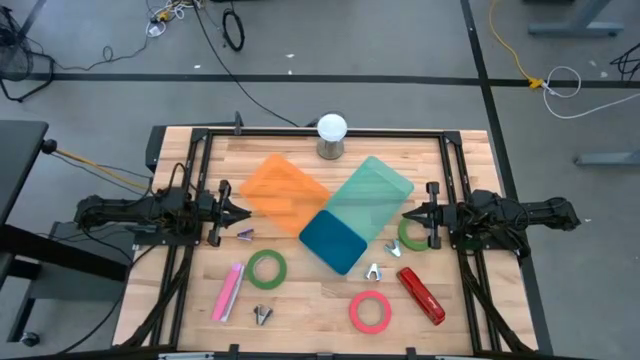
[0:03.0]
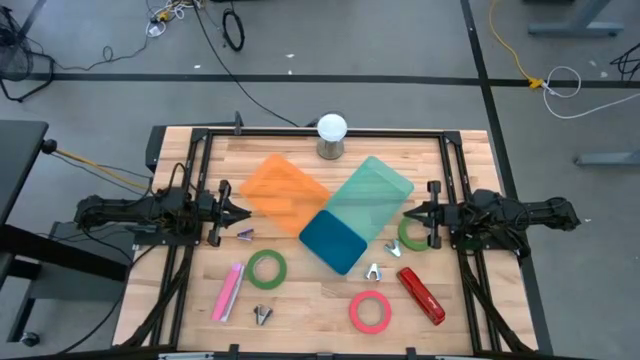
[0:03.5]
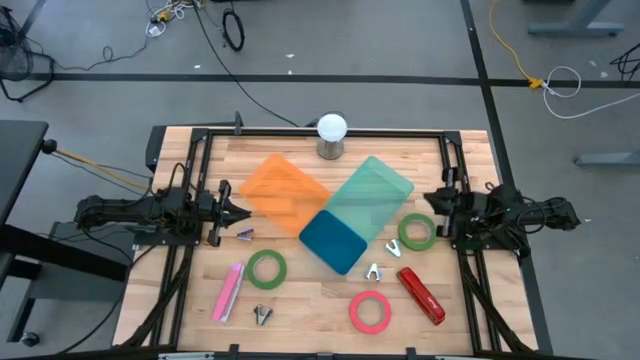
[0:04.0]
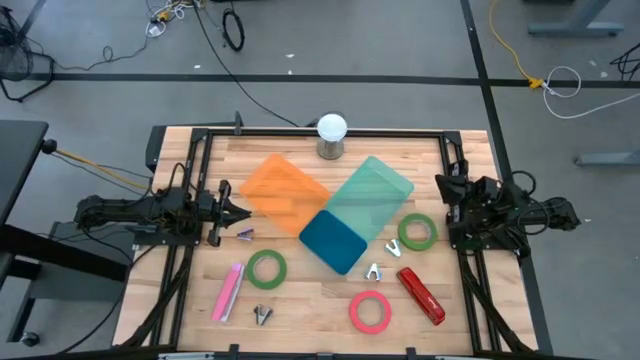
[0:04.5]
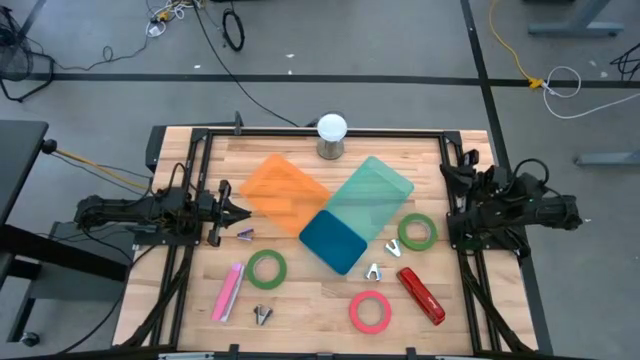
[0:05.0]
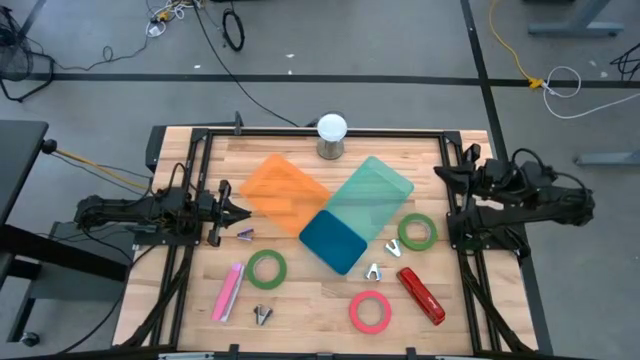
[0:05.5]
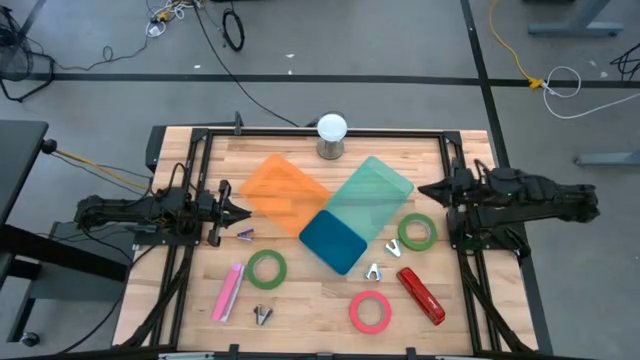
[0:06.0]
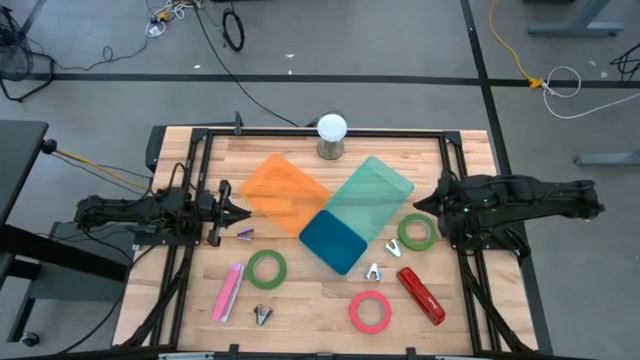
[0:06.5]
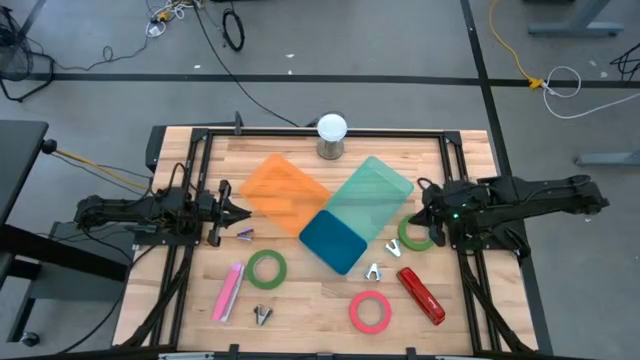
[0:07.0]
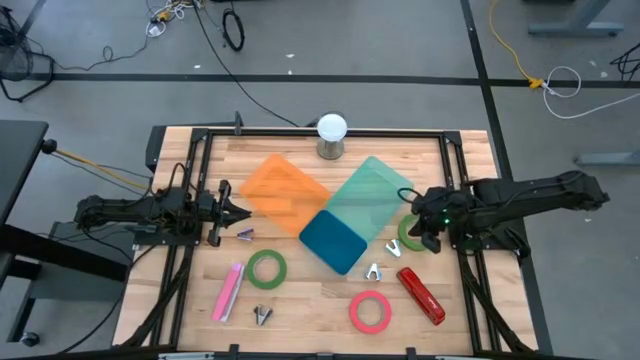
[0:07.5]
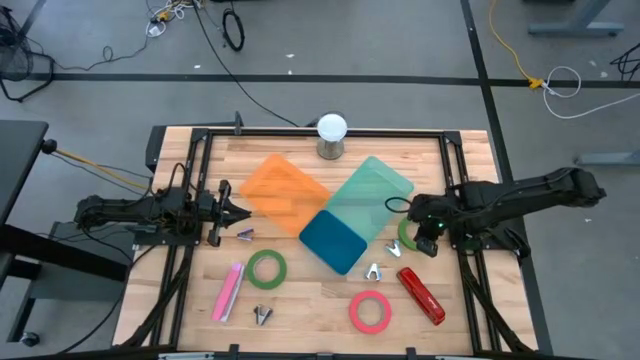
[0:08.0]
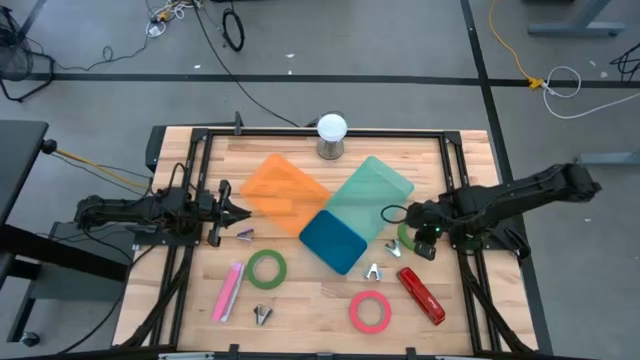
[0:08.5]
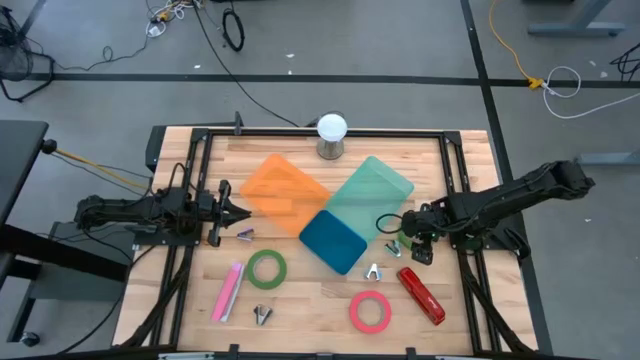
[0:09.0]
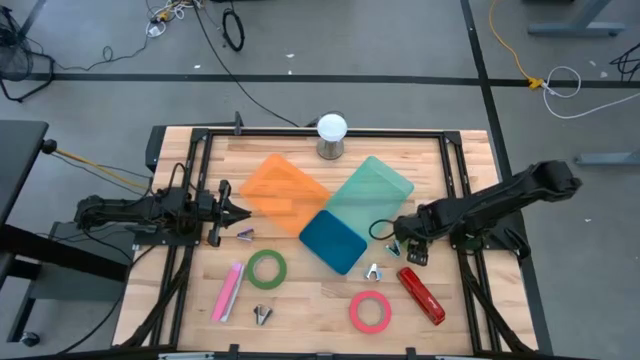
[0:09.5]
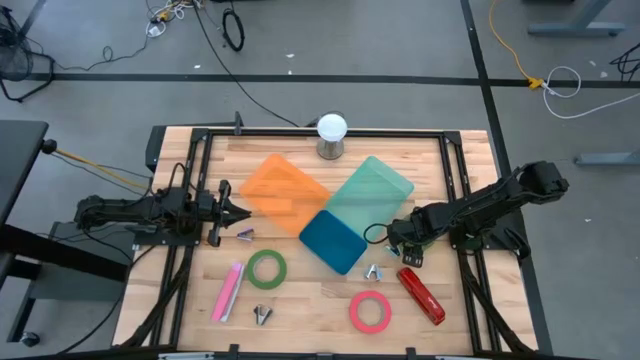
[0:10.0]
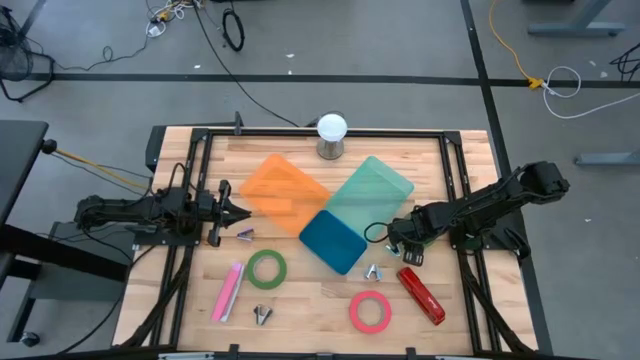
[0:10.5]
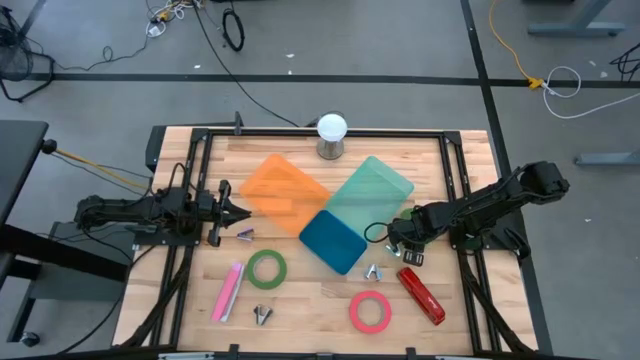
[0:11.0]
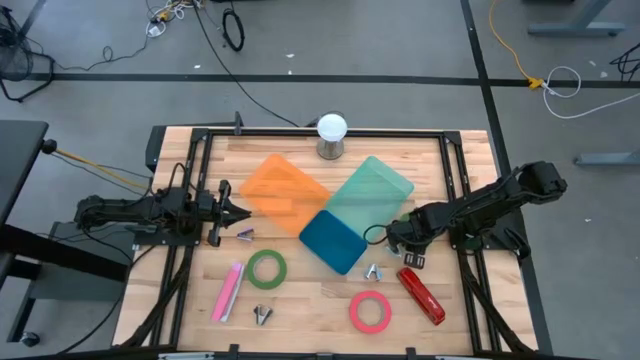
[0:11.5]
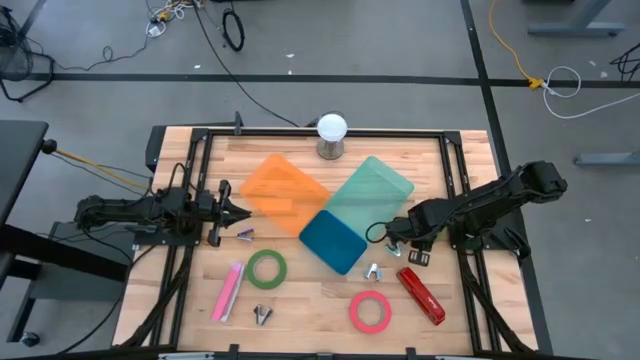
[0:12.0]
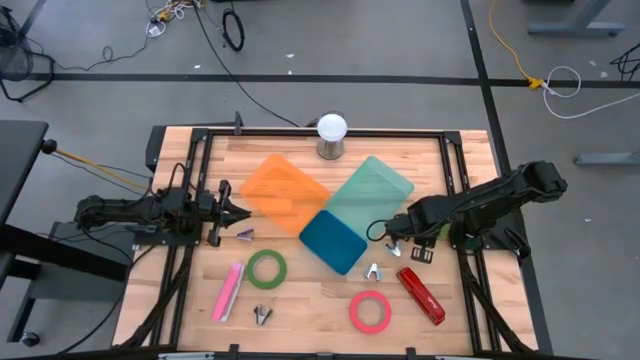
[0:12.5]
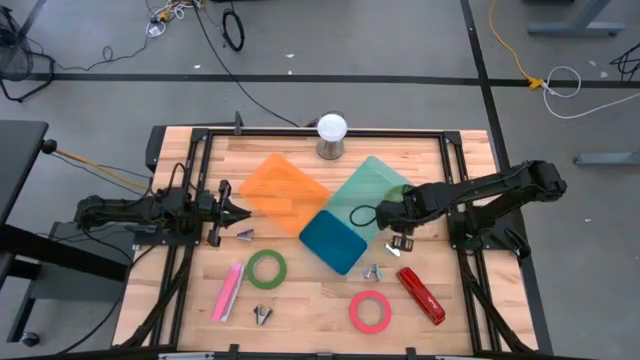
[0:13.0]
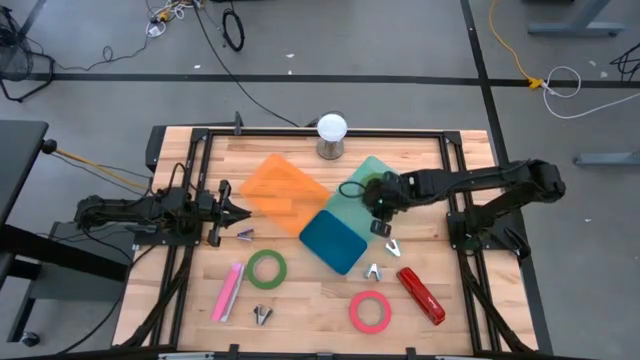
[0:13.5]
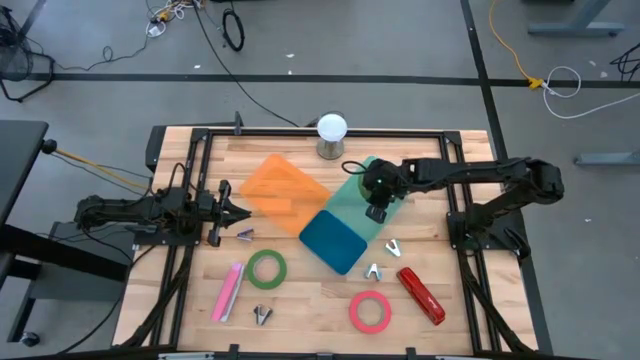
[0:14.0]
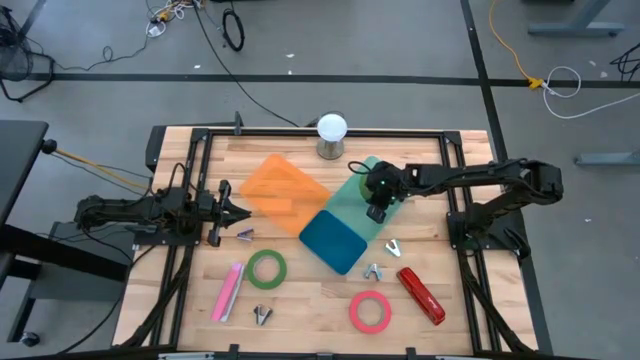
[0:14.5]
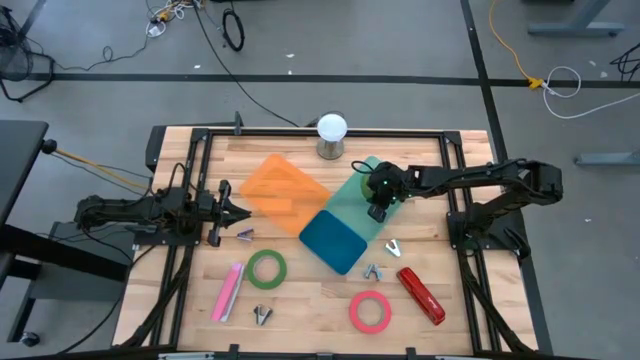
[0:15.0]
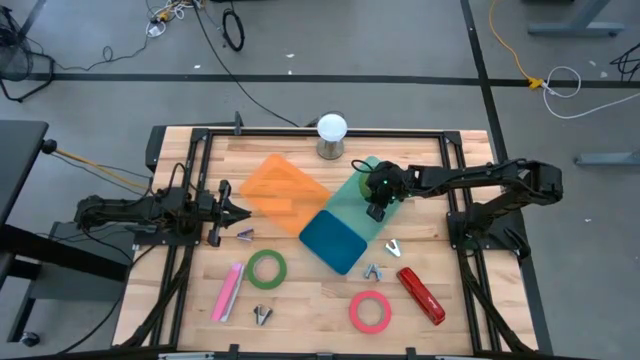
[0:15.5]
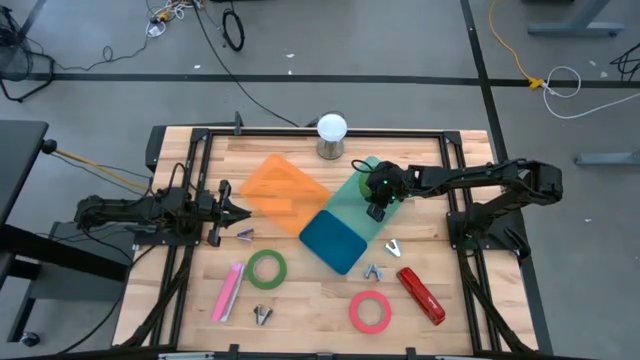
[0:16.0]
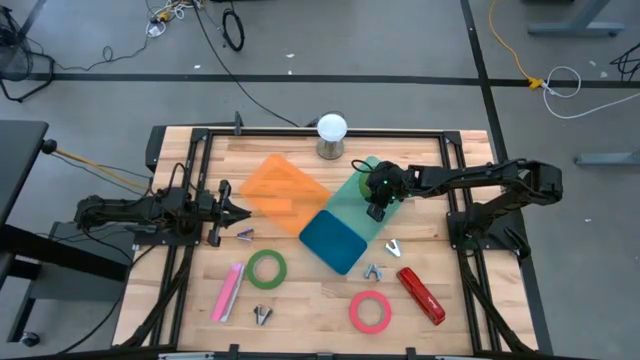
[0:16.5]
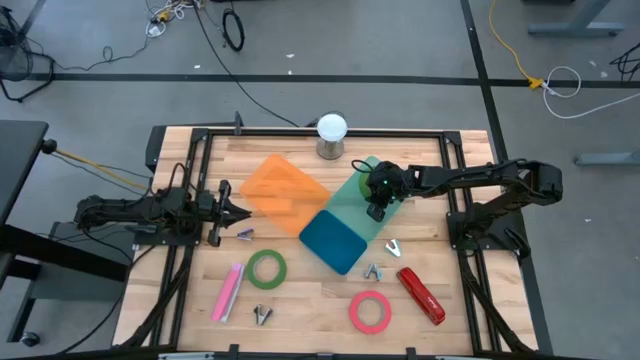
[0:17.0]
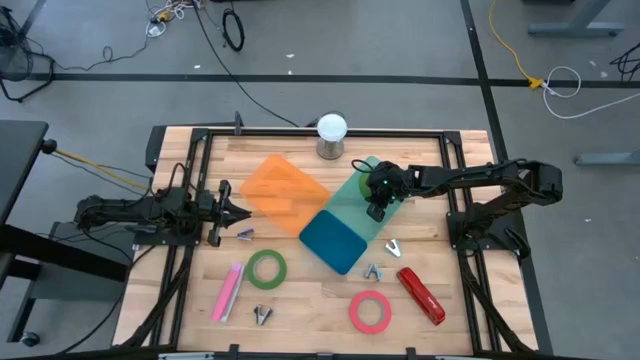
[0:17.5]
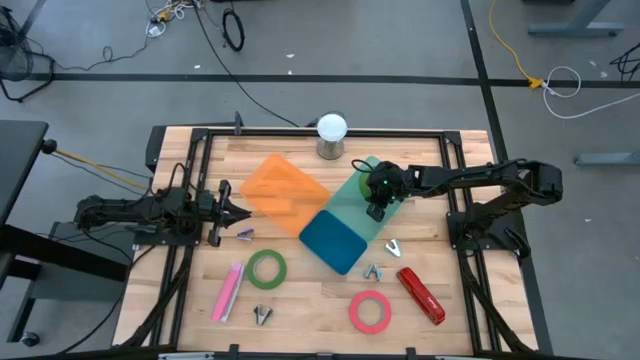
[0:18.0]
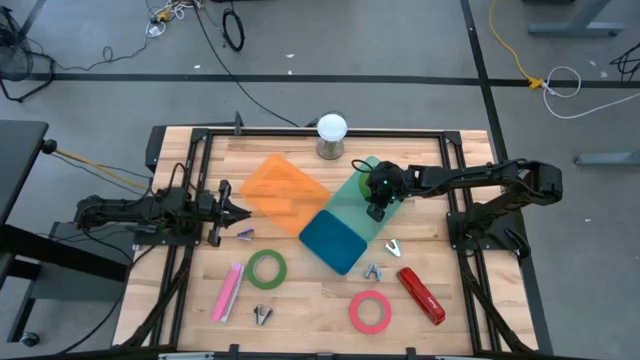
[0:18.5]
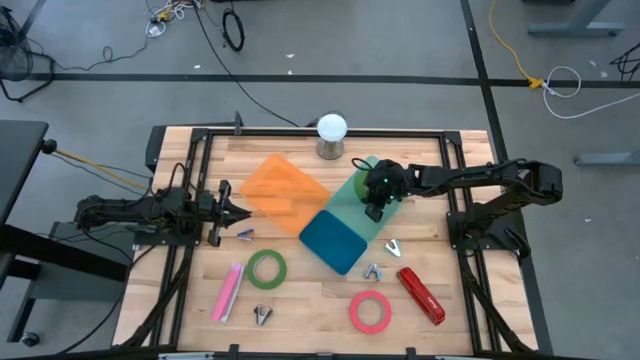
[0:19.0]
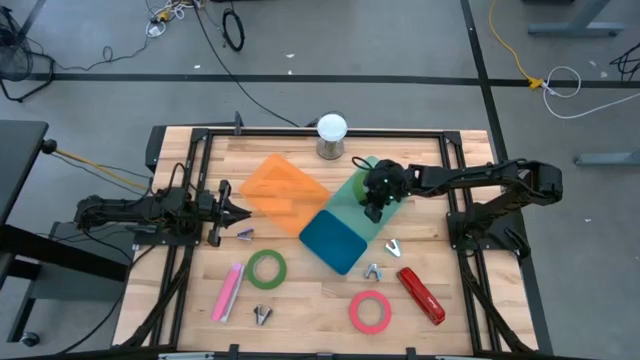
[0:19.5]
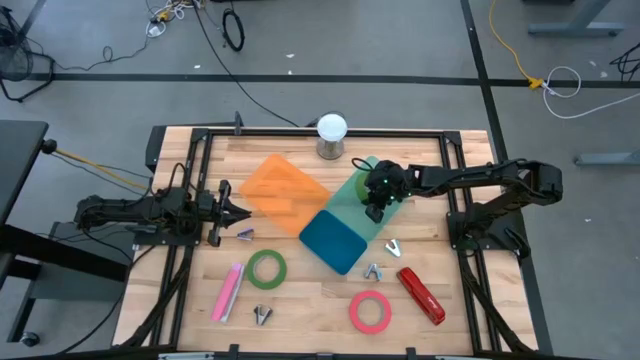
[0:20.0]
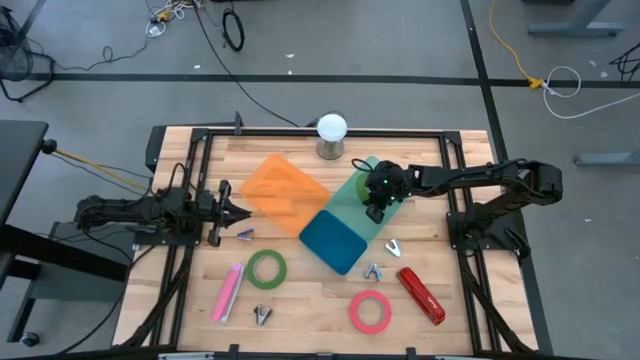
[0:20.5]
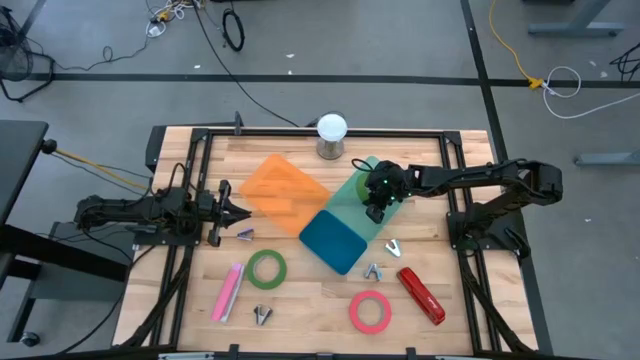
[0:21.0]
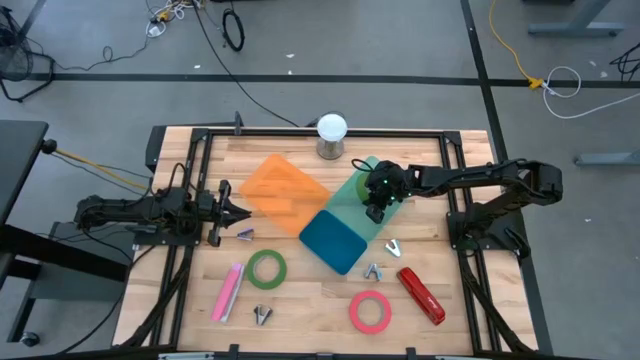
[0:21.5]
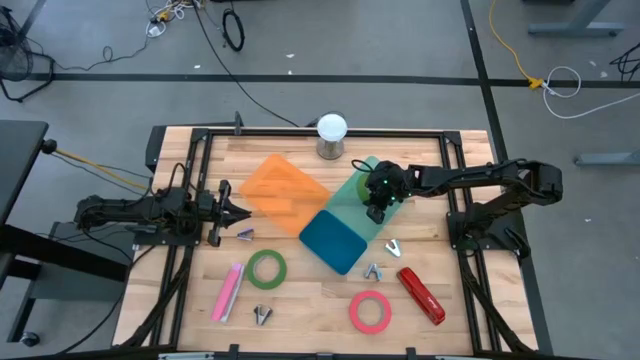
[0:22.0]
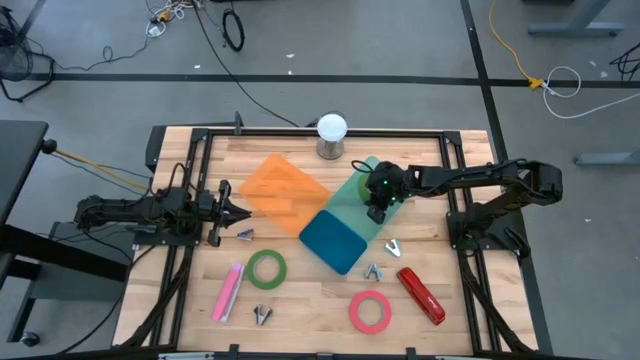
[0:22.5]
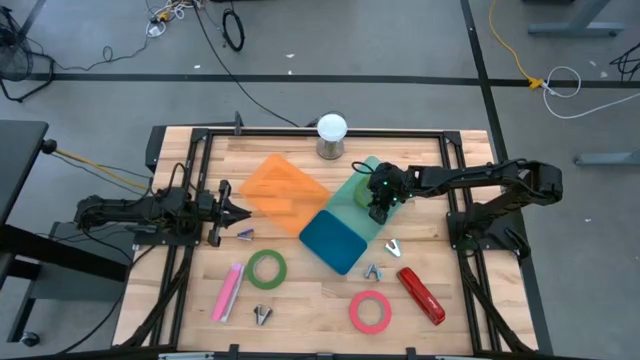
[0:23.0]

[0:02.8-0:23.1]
Task: Pick and place Stapler, Stapler remover, tape
Put the right green tape into the green bin
